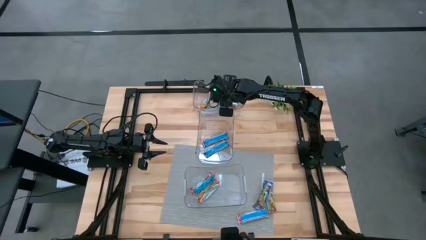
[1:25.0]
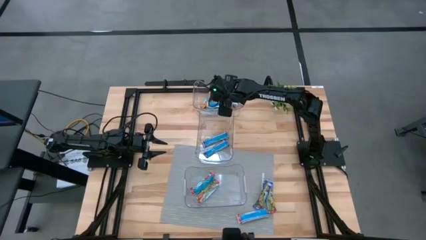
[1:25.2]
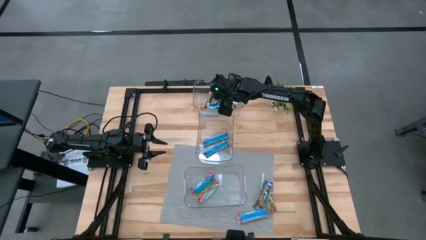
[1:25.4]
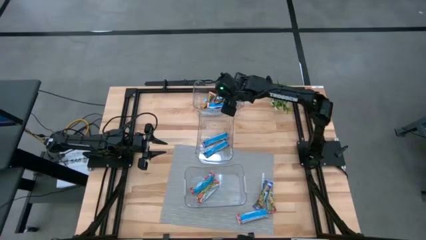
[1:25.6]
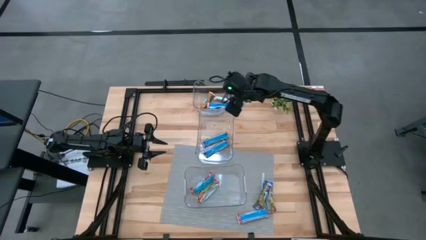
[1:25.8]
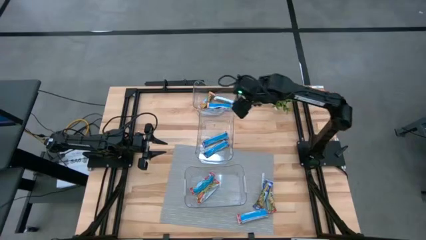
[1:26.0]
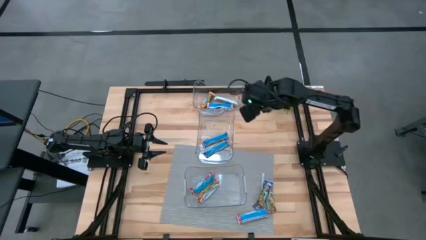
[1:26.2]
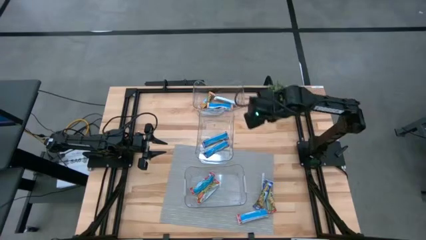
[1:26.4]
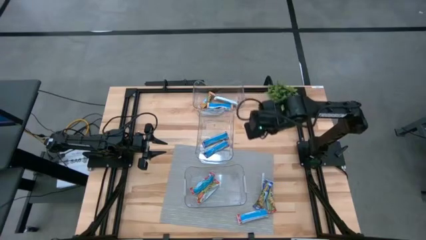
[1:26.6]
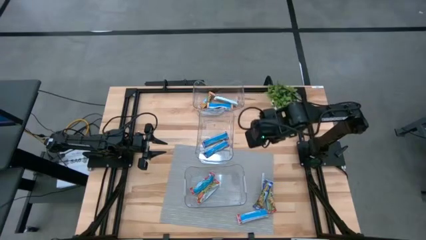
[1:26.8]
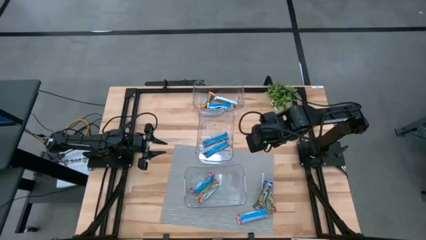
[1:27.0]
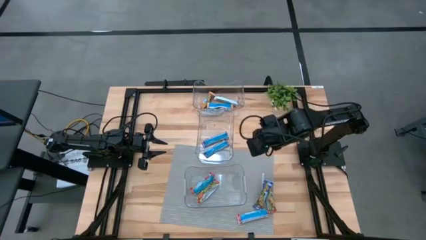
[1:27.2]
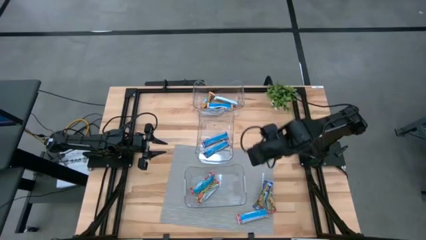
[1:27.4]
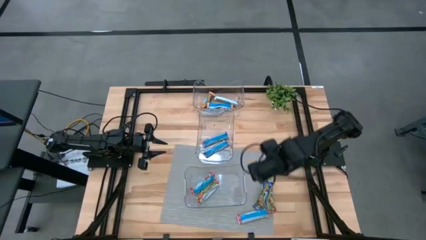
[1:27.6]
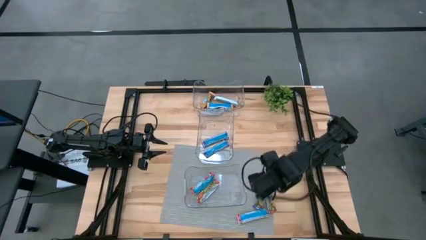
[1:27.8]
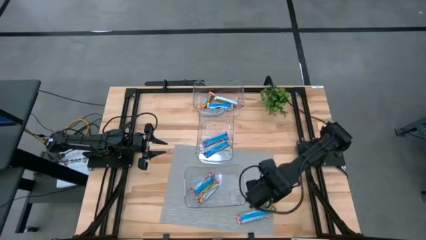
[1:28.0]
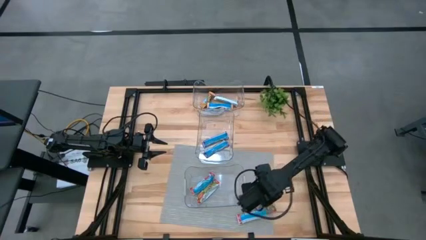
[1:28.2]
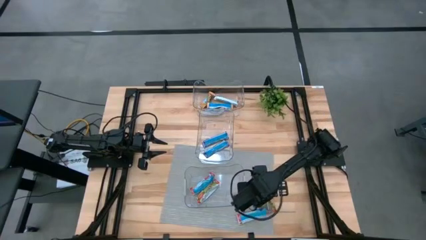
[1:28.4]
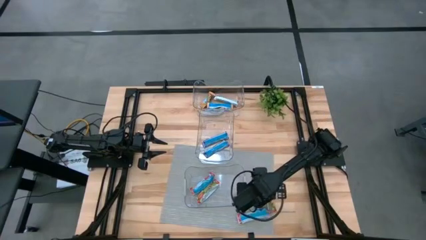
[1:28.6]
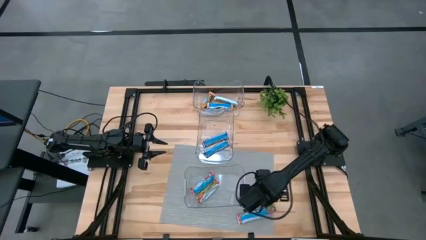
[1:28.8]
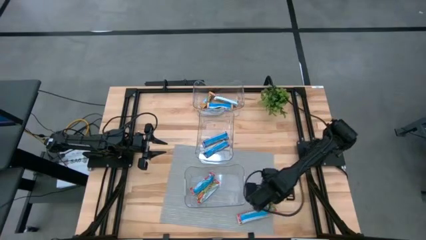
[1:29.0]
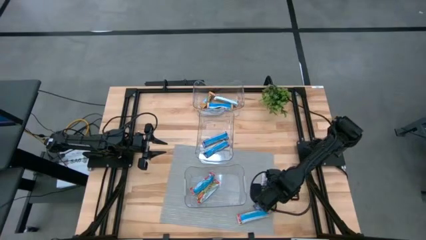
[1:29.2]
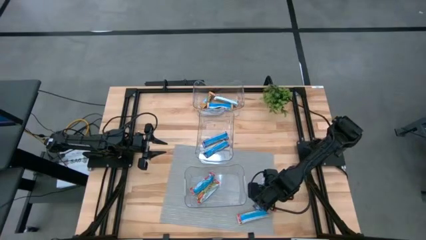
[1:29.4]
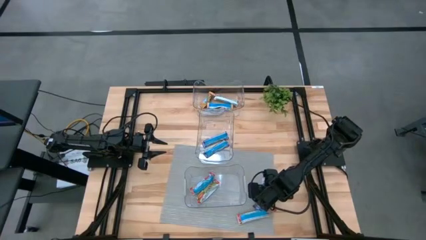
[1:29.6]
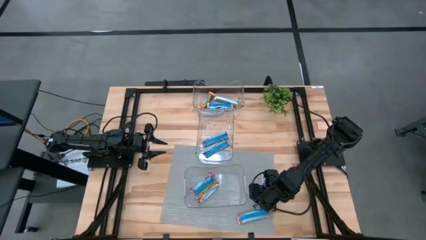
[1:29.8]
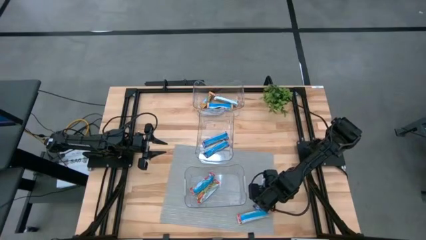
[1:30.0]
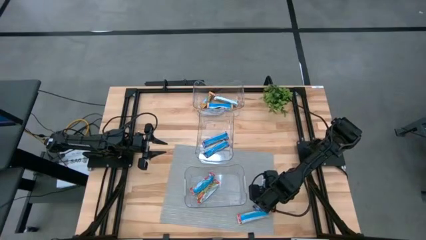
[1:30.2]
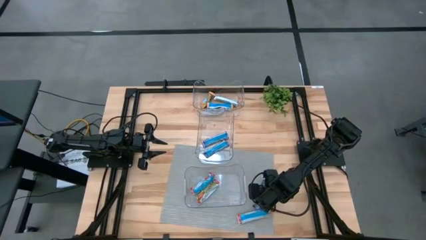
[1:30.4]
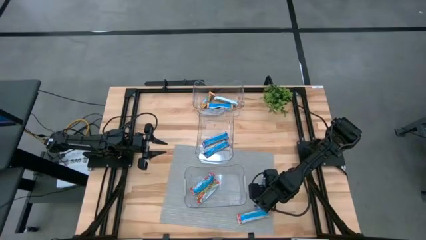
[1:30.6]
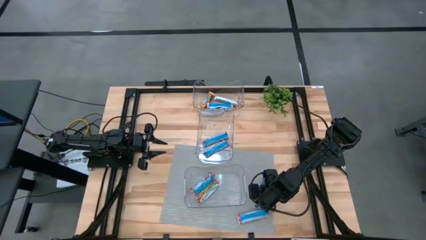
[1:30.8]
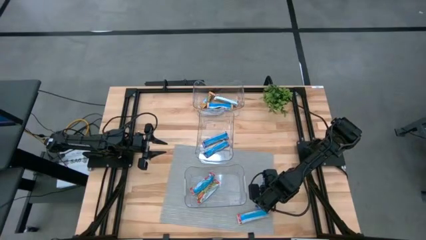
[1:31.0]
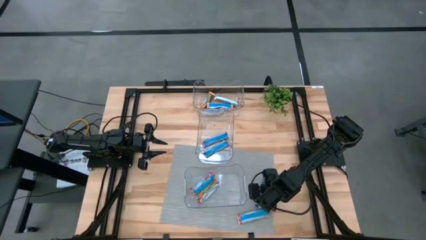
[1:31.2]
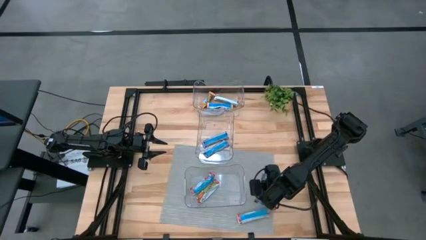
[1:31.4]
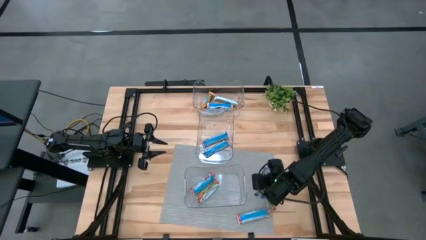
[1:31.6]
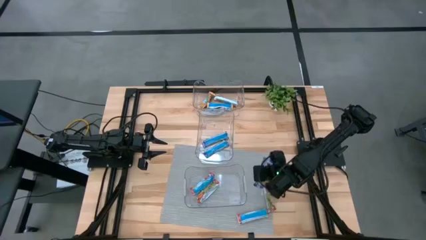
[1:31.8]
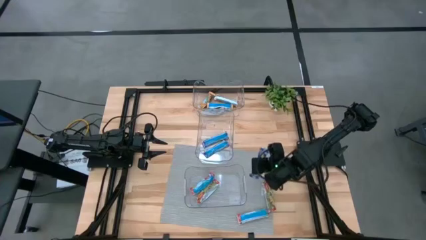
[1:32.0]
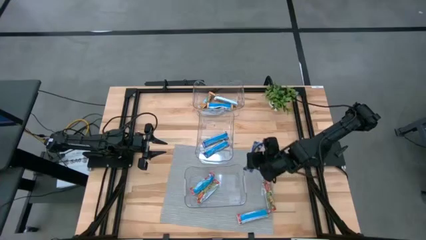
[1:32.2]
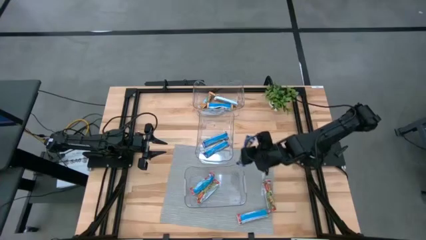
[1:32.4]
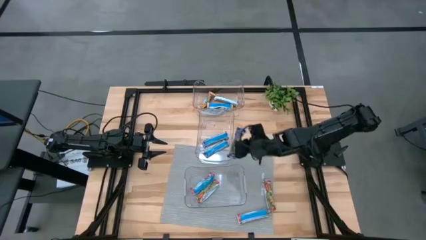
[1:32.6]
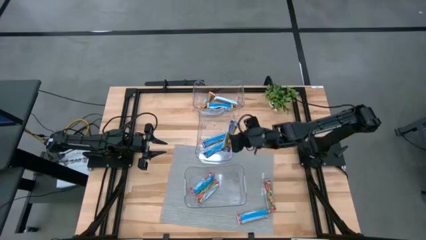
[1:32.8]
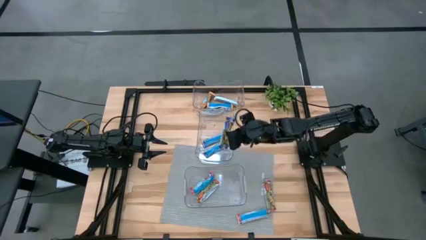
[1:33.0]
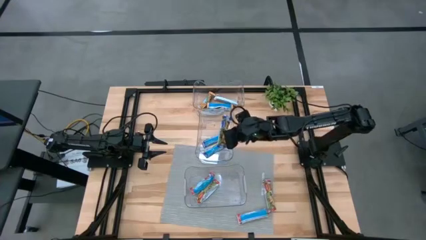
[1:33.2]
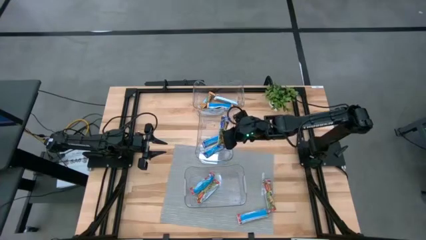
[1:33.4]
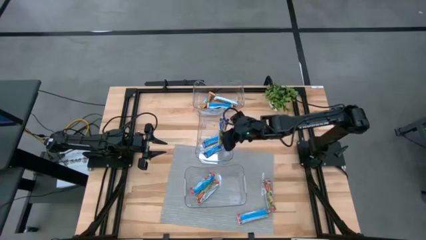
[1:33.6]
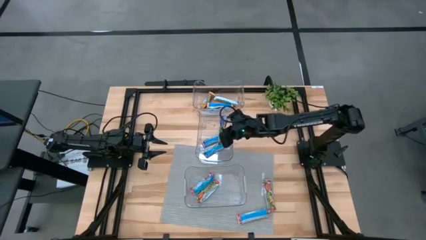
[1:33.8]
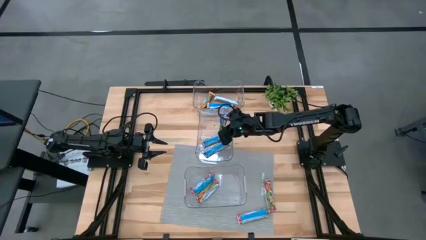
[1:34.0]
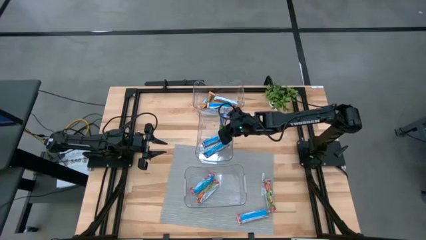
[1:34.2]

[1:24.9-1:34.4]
Task: Pick and place Granola Bars by type
Put the blue granola bar into the middle transparent bin

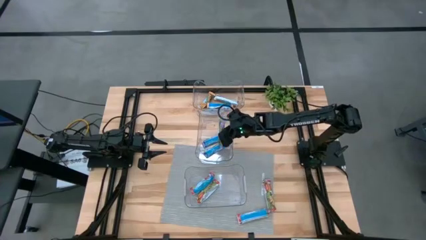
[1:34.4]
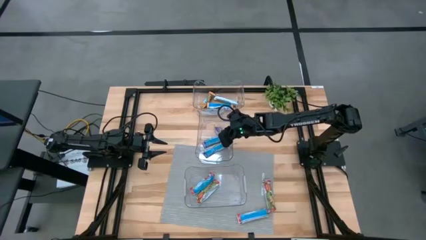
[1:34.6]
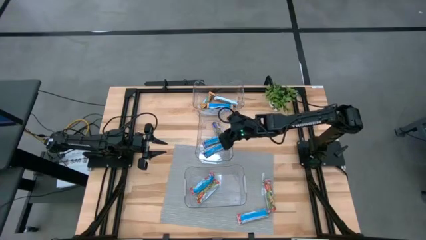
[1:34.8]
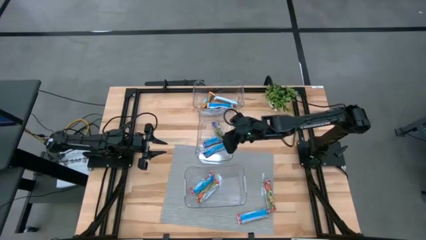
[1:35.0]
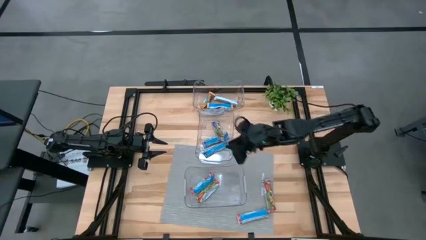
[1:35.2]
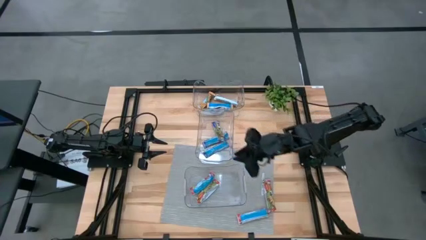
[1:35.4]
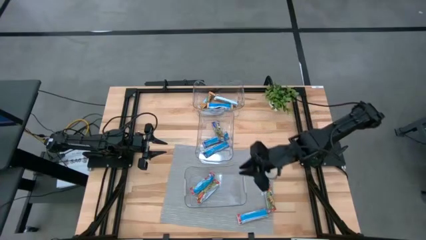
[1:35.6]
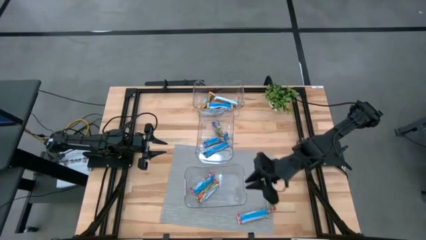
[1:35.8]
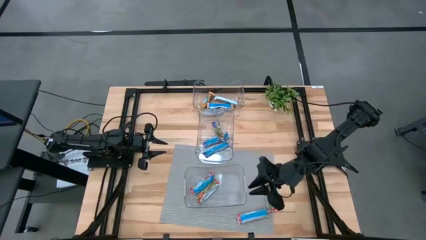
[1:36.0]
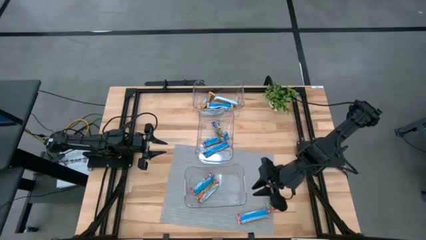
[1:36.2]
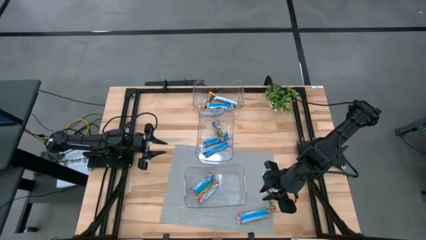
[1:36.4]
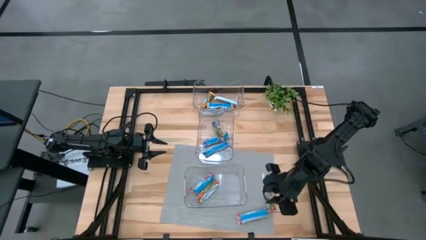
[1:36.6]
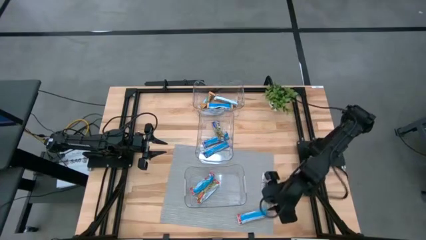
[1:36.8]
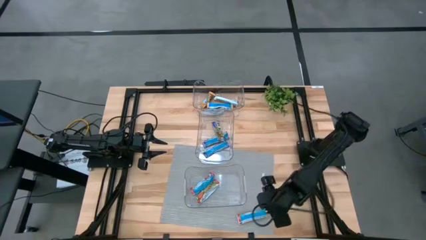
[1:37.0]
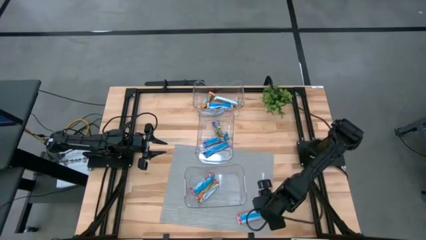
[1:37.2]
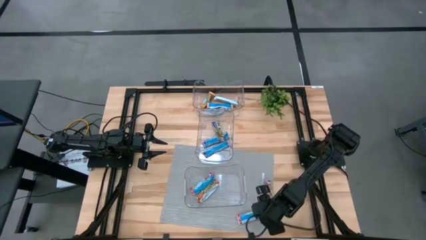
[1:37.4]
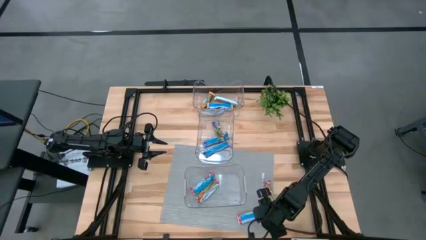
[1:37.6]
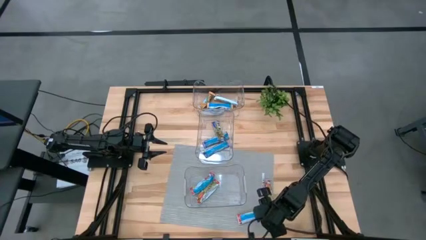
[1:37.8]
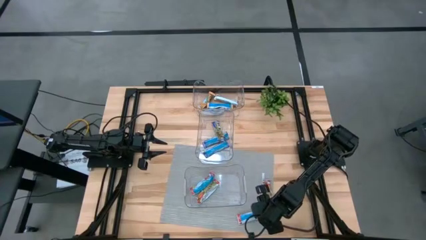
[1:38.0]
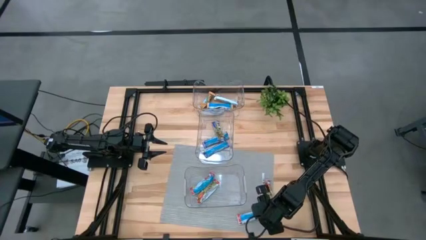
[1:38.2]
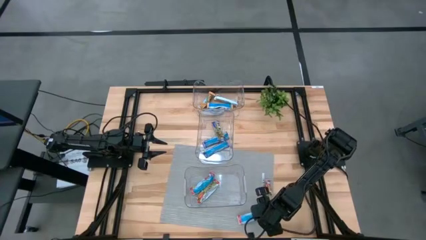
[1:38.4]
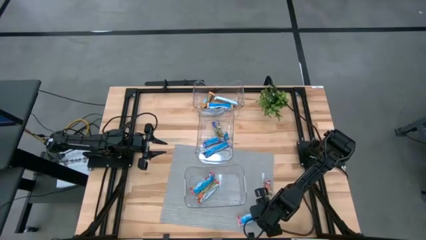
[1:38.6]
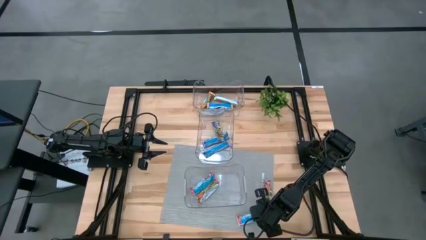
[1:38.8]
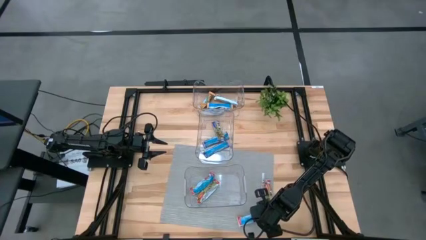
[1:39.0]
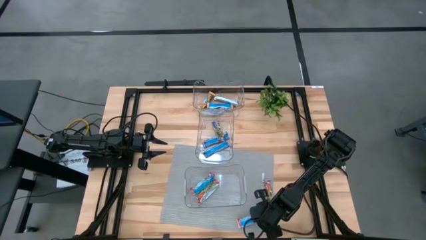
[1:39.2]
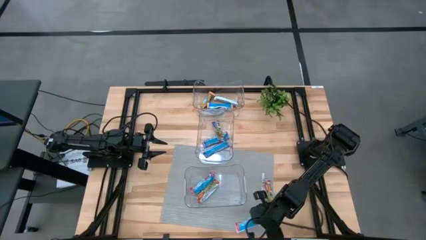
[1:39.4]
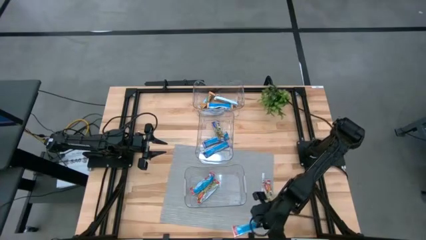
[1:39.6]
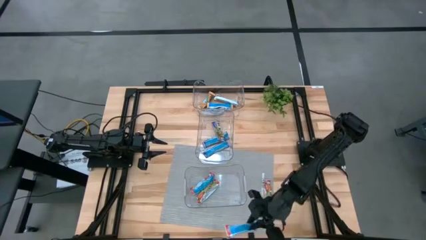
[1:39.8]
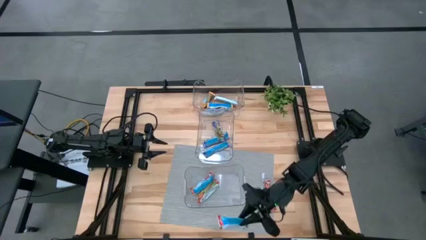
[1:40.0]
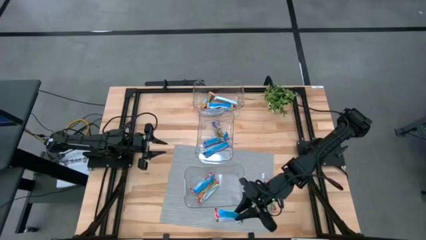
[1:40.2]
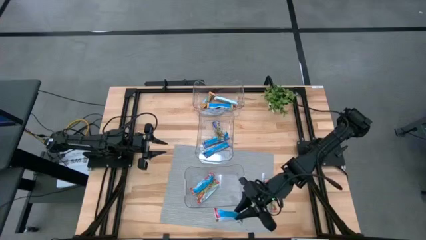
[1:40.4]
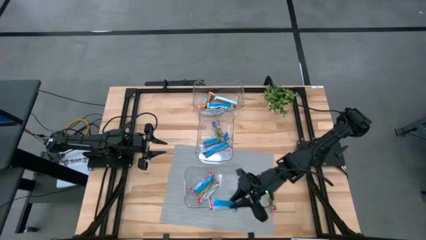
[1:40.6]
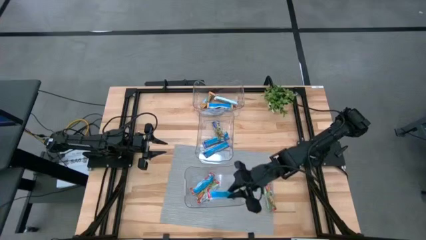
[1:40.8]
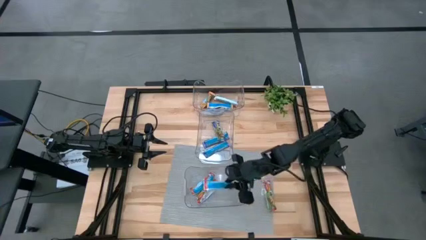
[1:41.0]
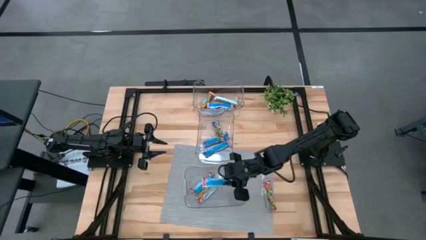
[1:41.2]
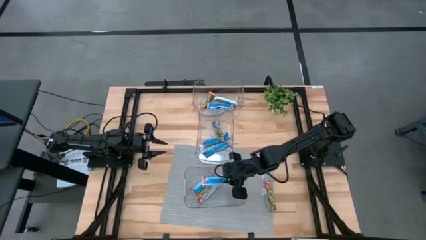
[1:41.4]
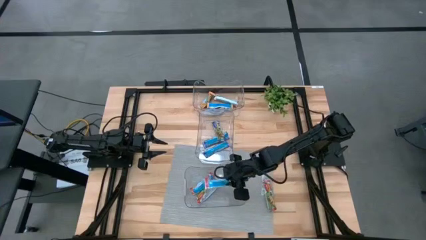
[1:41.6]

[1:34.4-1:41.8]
Put the red granola bar into the bottom transparent bin
